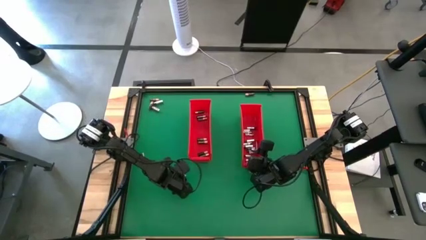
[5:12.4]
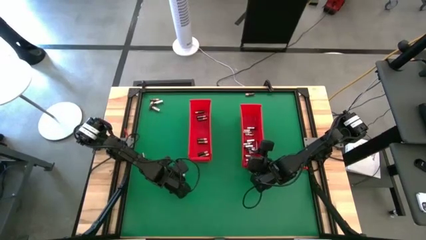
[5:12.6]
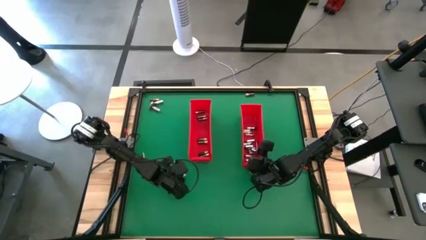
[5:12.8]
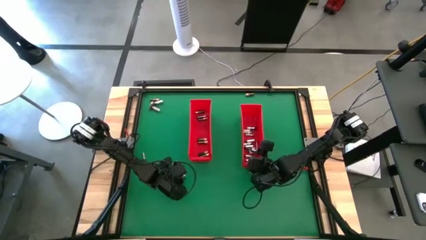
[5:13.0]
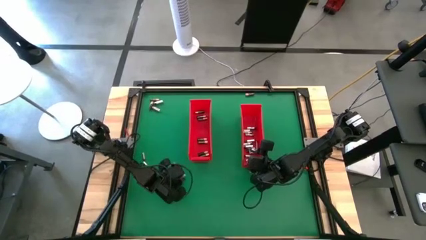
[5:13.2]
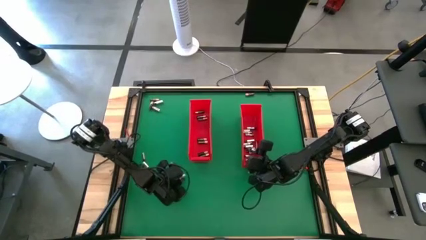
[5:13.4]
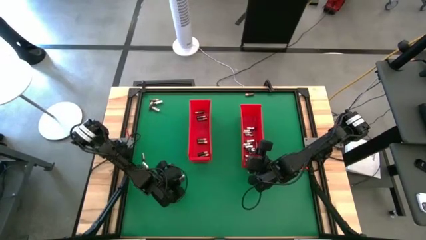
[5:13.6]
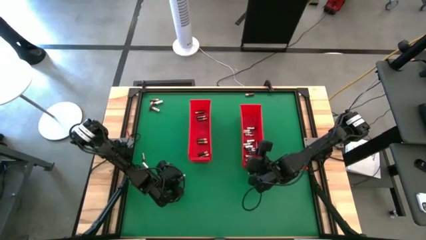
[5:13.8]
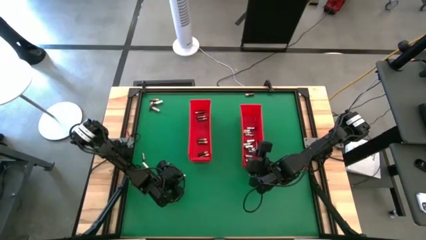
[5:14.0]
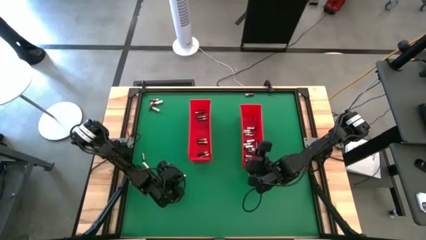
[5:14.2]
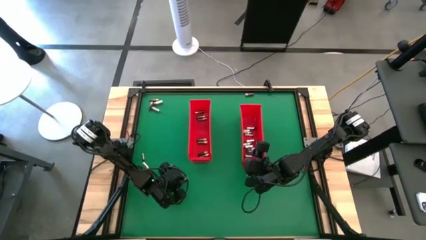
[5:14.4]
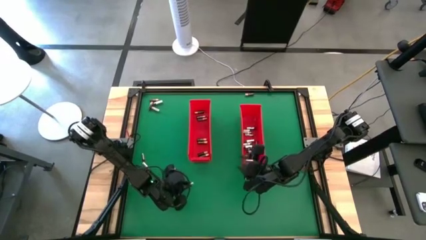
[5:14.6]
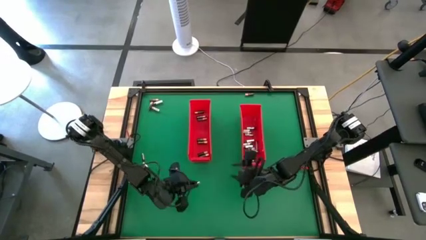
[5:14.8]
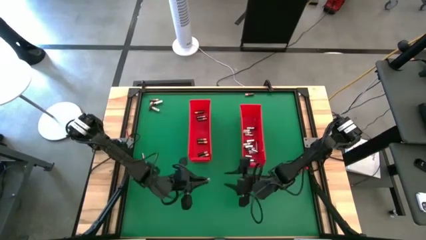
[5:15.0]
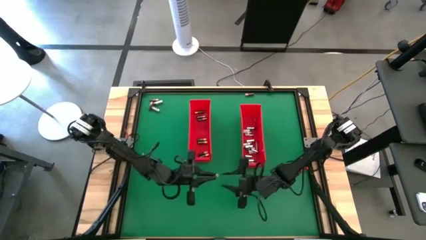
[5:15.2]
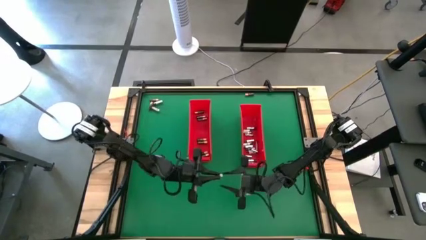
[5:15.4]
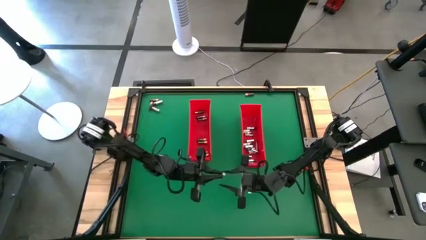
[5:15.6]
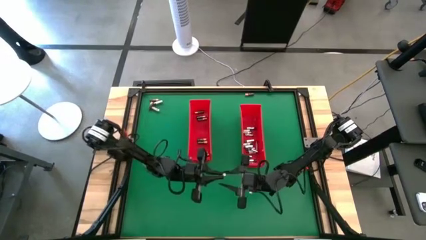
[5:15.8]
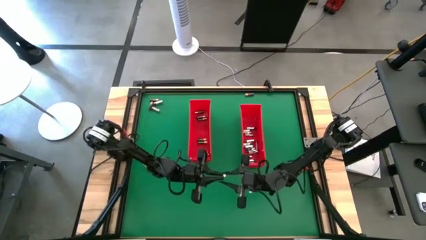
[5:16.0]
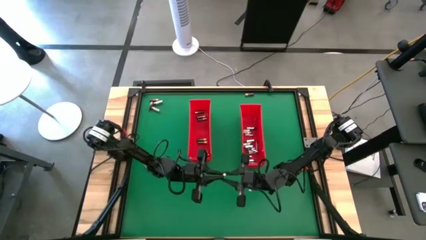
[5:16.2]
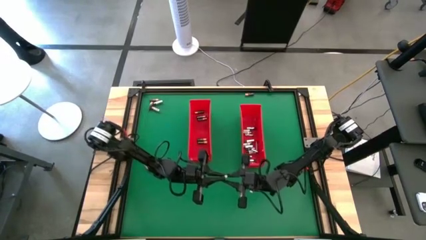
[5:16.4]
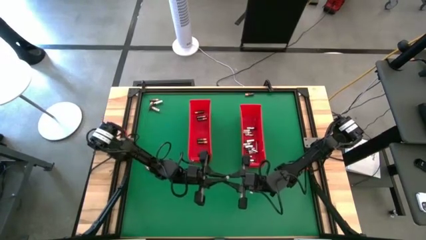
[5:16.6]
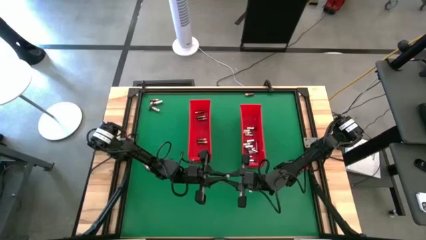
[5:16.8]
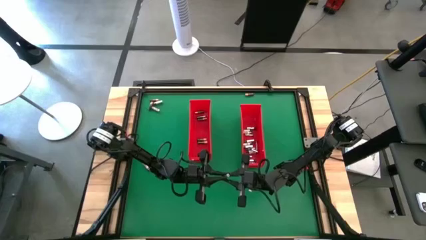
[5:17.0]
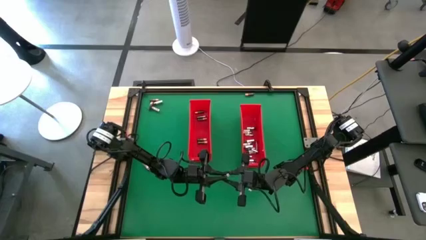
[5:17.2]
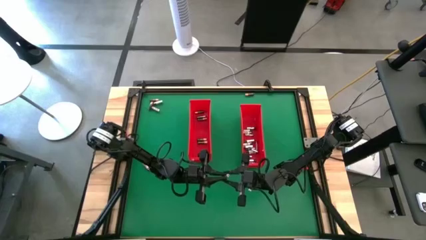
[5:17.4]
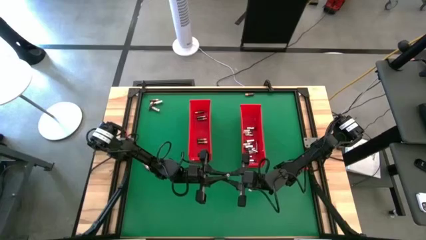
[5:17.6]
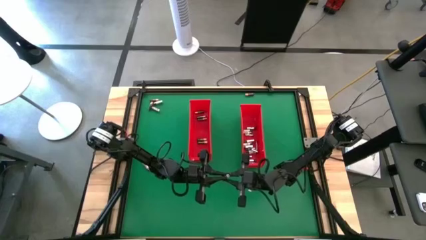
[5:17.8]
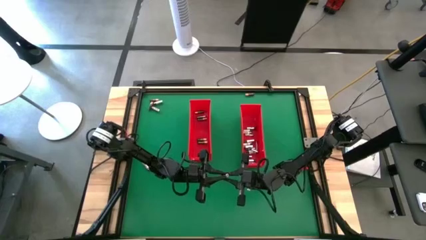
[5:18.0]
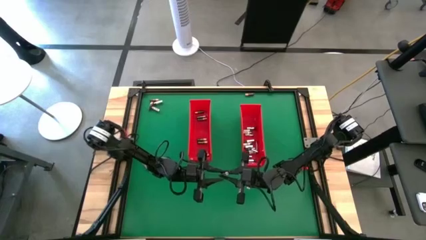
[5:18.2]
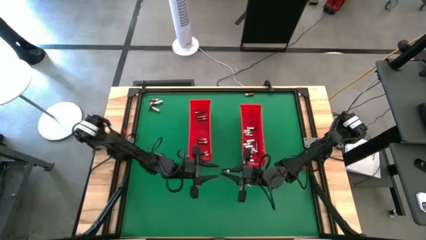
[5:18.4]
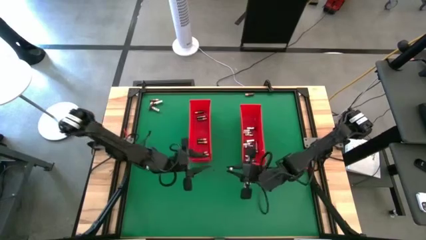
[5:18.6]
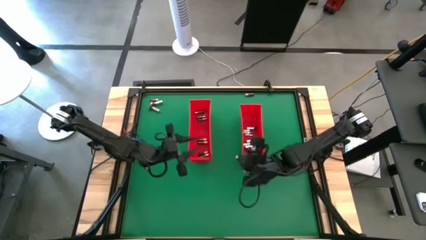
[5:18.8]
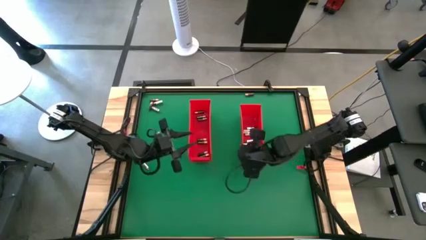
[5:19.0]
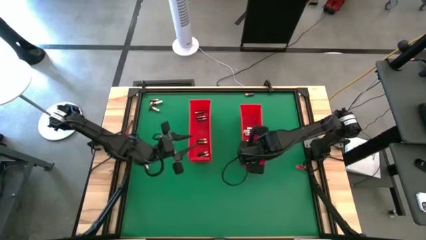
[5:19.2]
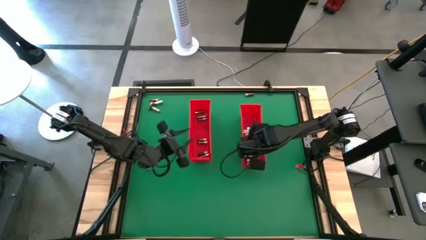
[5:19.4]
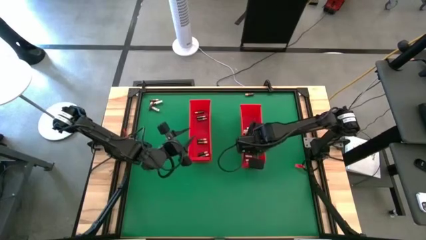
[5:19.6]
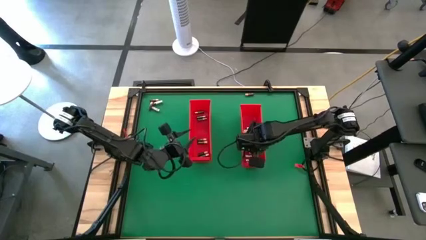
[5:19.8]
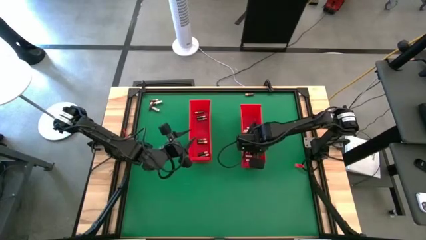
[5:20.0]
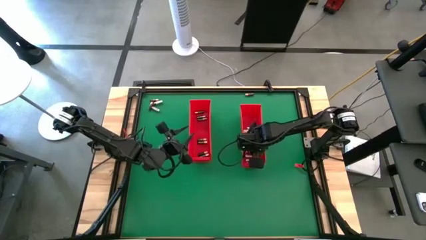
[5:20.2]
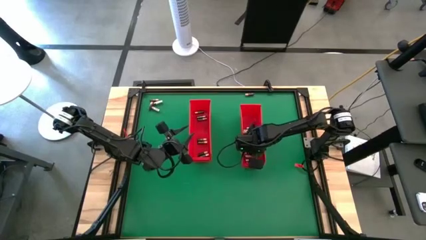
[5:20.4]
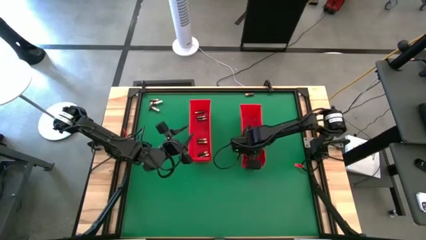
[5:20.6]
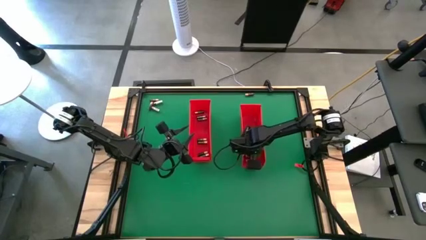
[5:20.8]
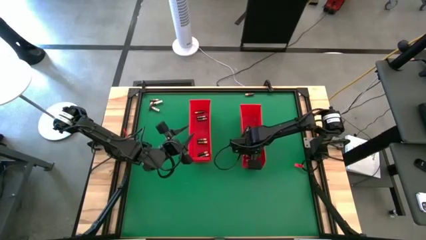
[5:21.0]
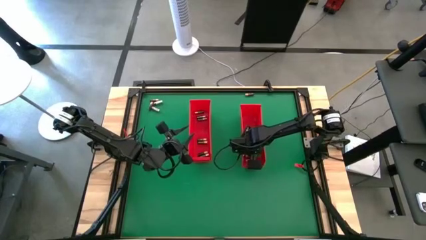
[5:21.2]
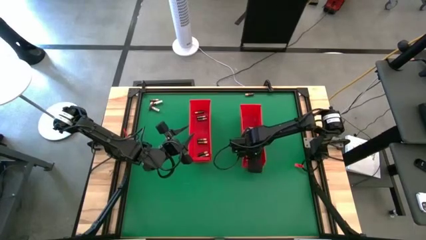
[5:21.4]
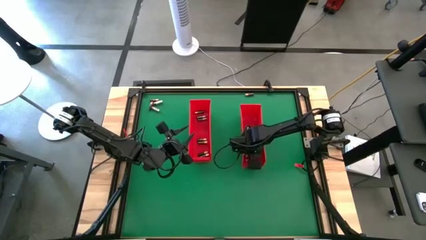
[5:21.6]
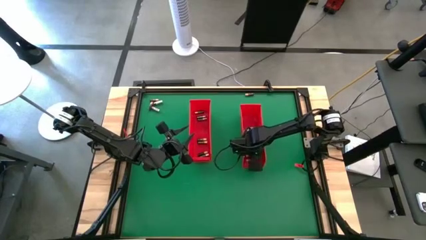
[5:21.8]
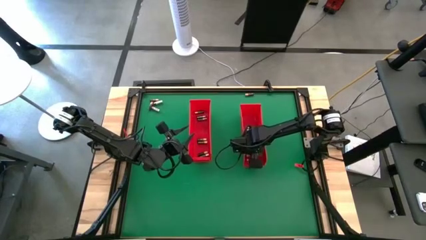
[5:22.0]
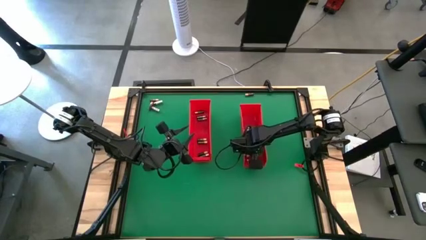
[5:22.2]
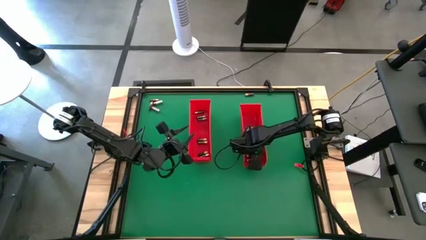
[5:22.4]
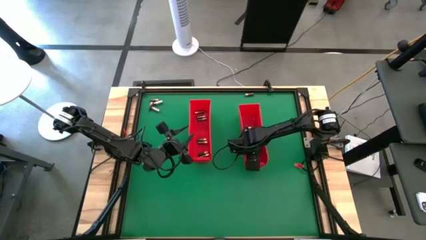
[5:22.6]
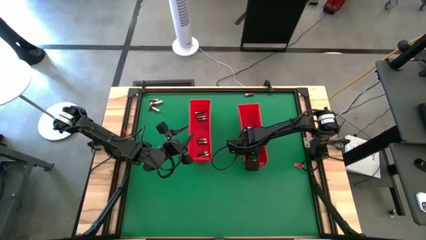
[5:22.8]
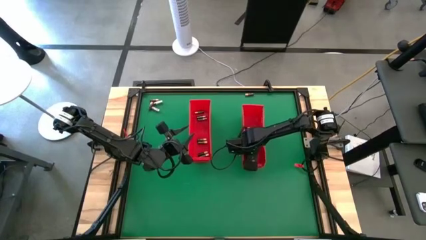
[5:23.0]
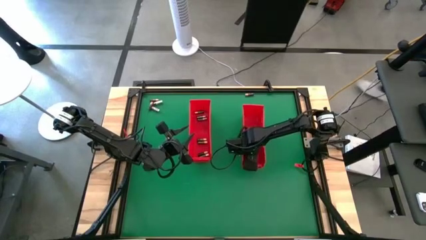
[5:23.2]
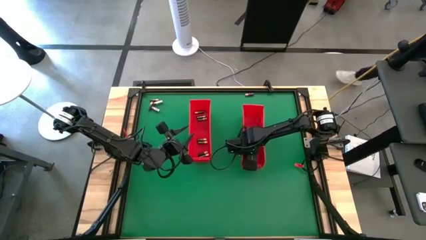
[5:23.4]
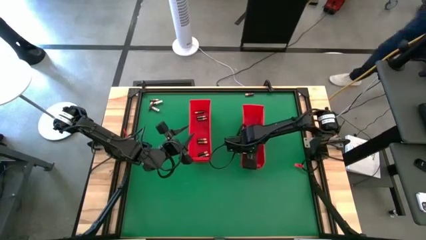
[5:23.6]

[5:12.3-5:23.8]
Task: Sort batteries
Put the silver battery into the right red bin
